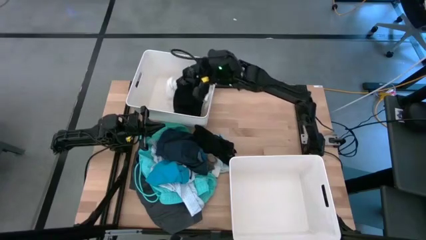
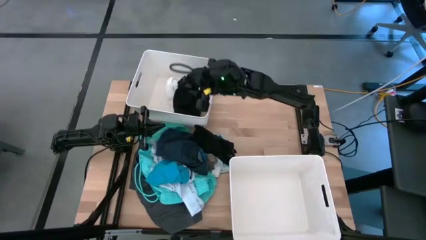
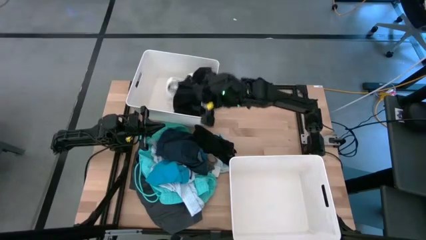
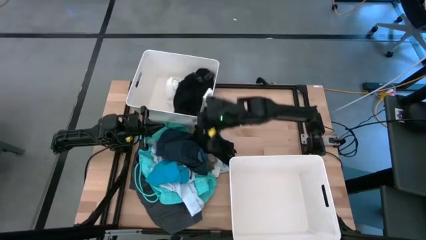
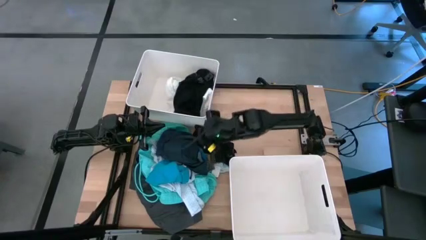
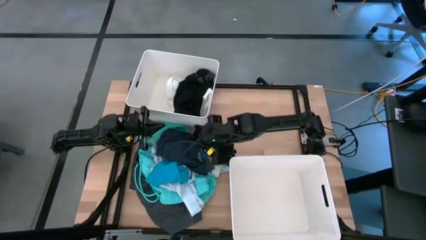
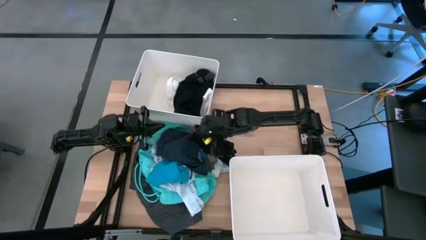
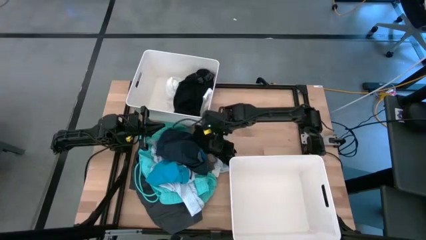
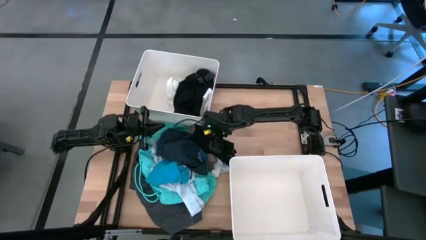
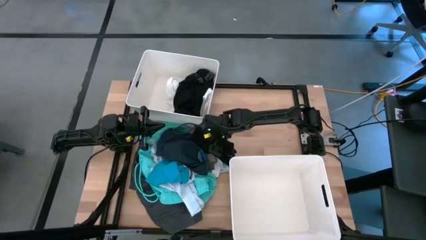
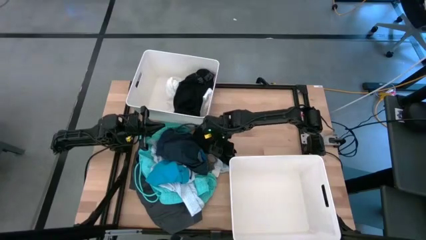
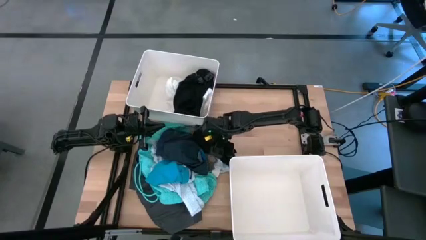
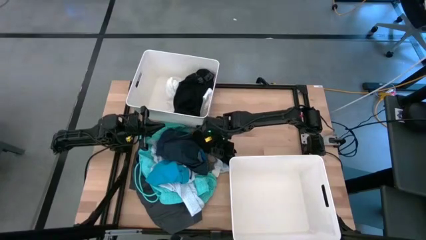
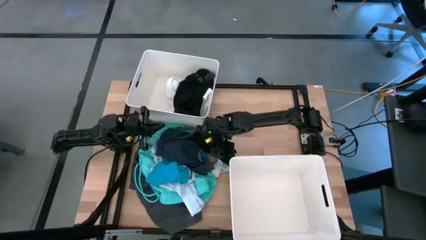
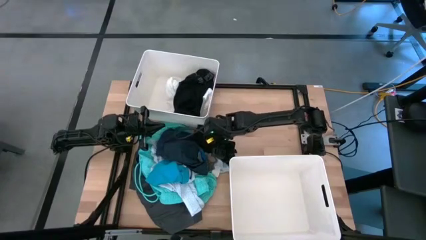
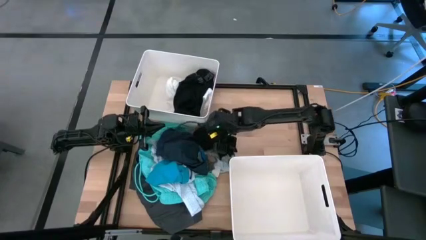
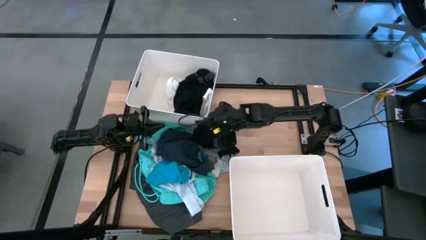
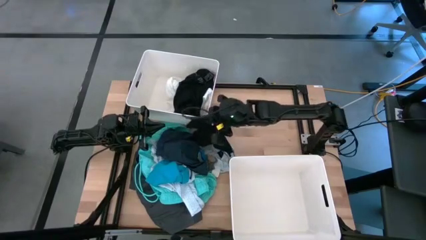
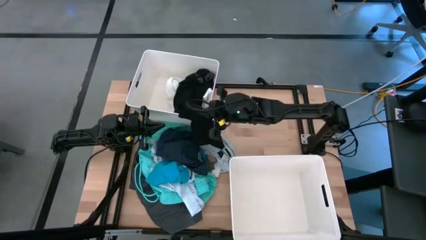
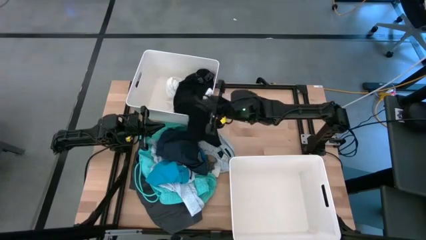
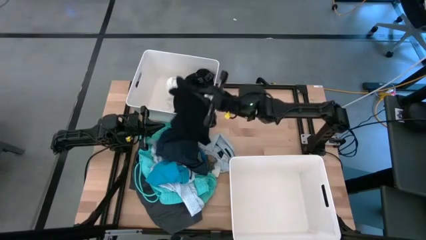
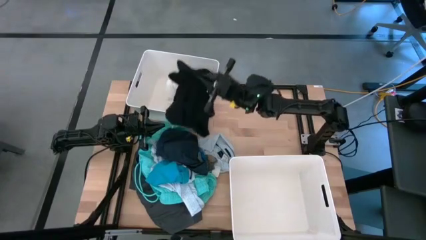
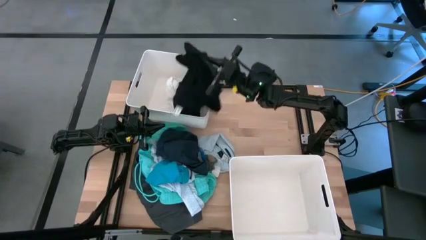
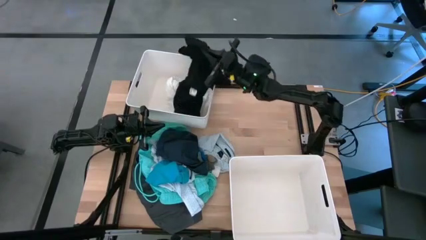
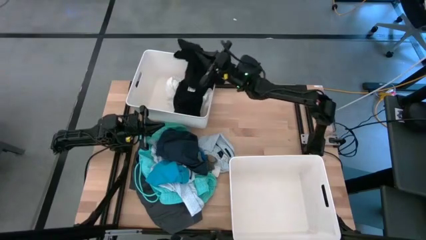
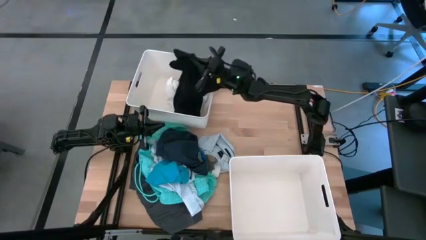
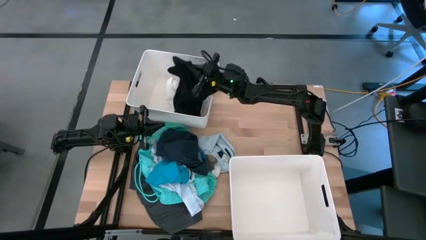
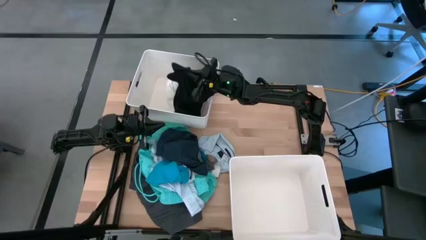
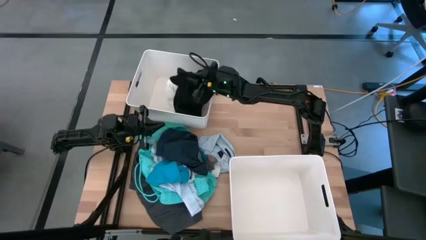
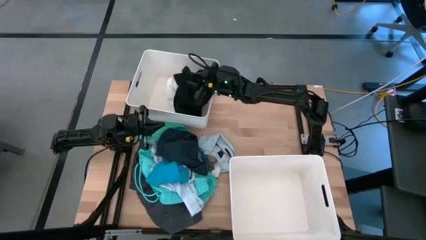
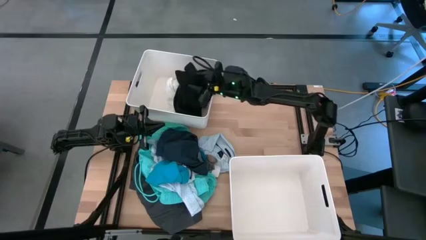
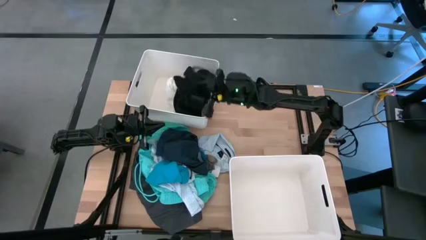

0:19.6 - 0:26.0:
Task: Sort clothes
Put the black boxer into the top white bin

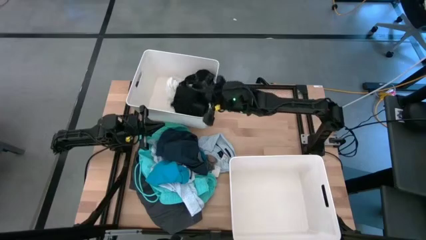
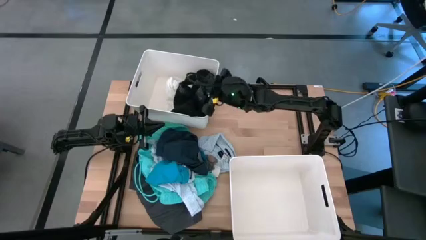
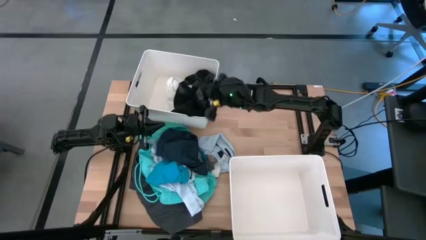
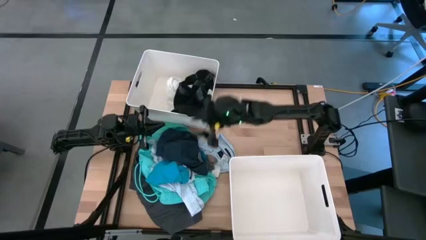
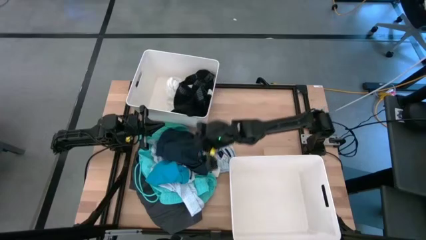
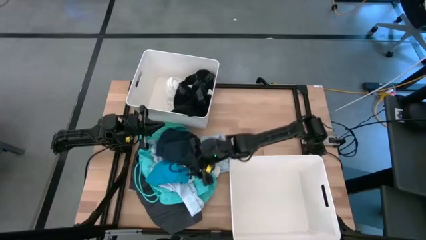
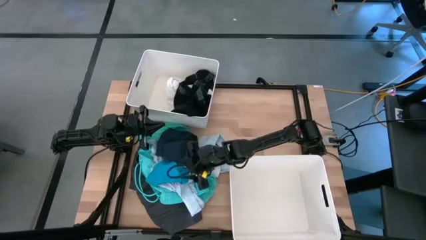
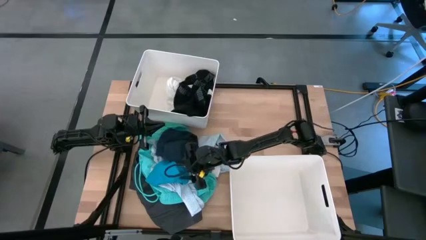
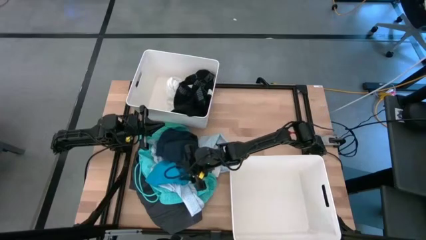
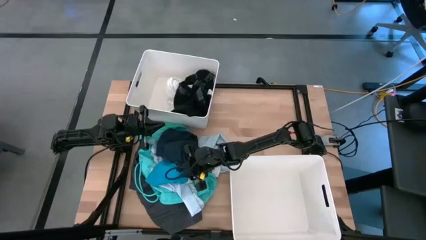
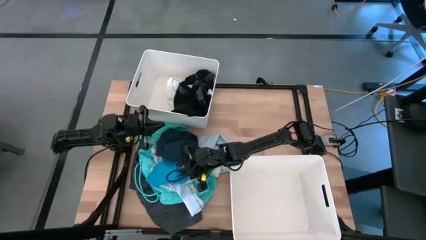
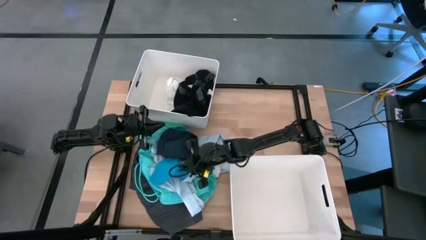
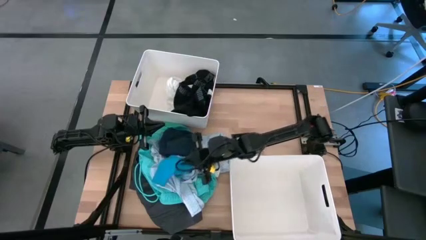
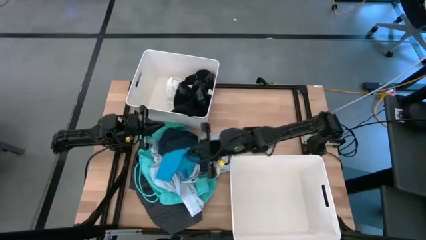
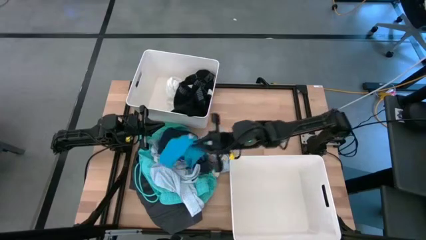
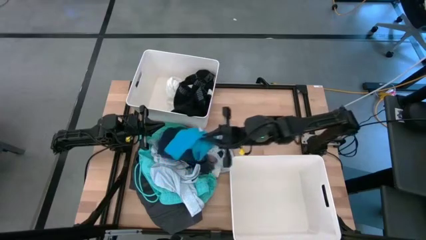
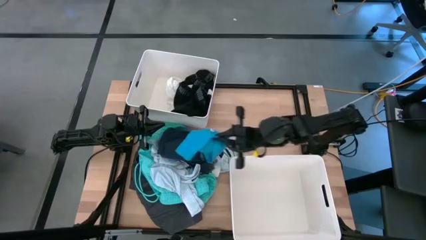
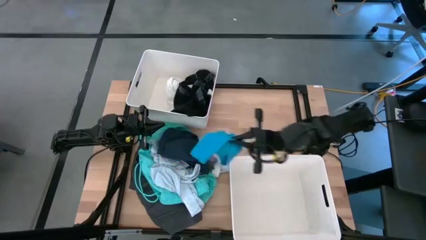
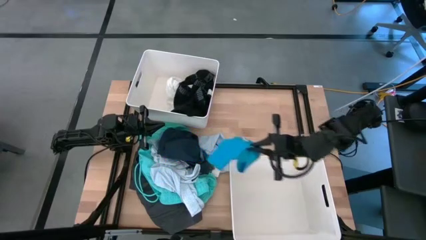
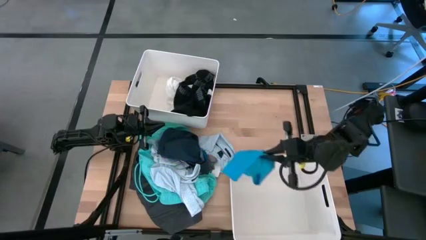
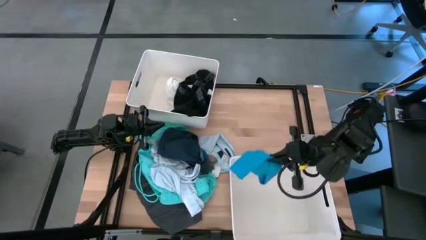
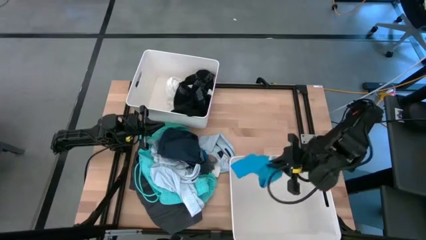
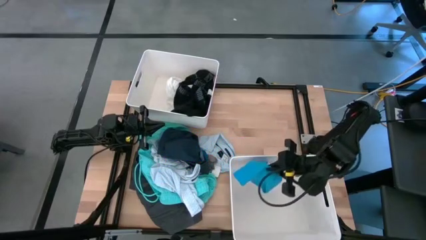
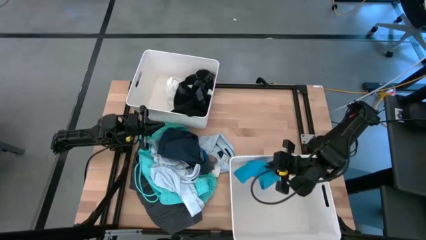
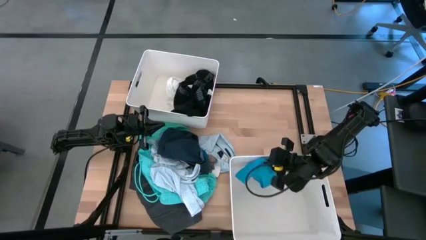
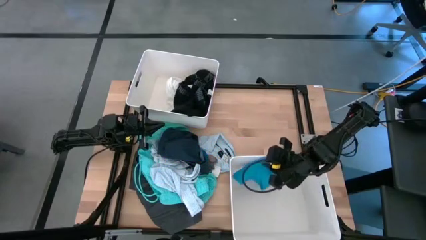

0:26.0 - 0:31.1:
Put the blue underwear into the bottom white bin
